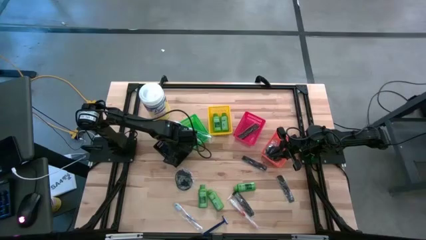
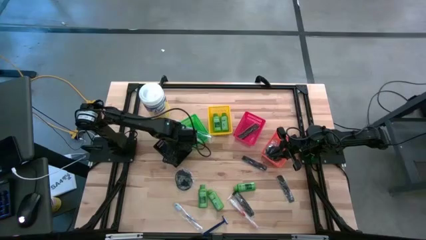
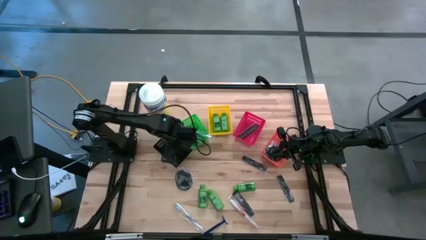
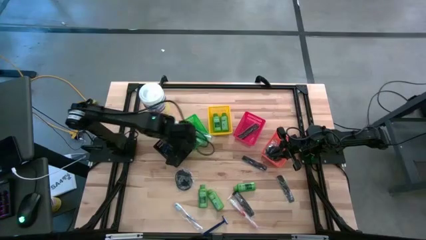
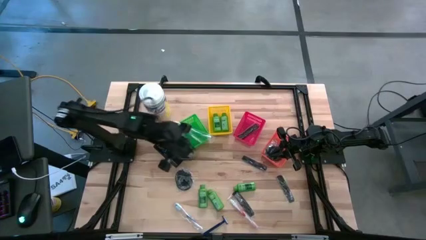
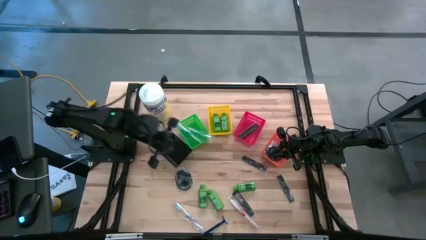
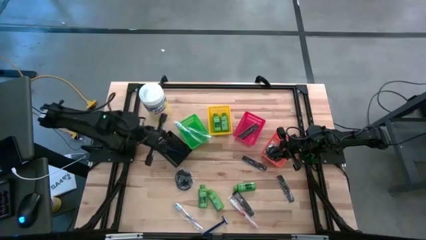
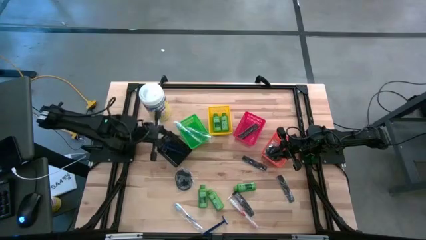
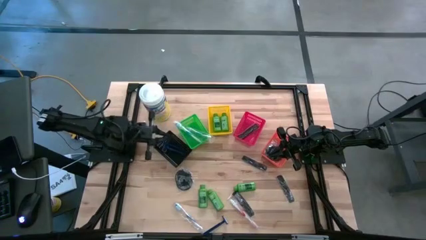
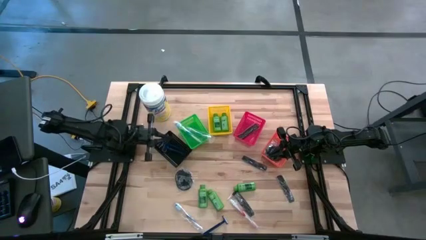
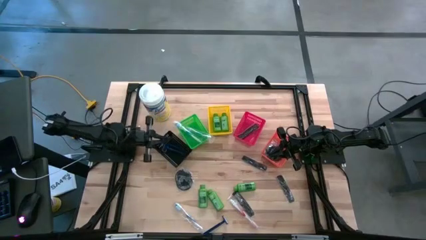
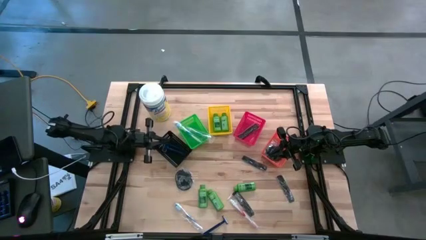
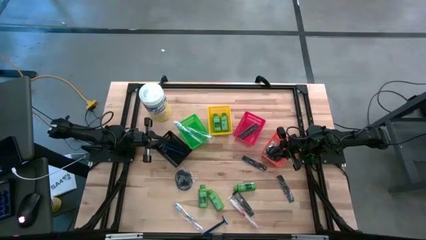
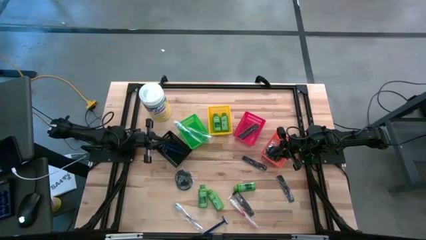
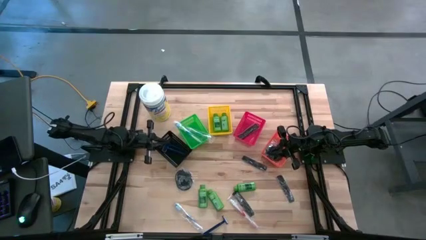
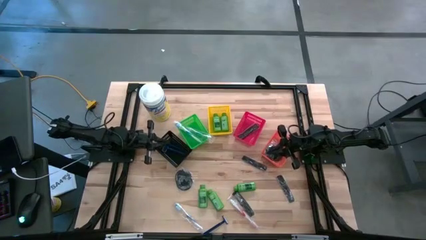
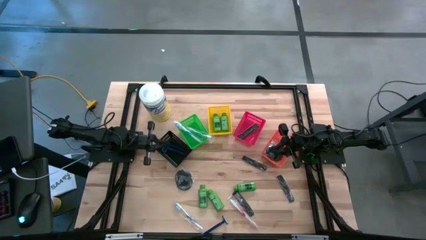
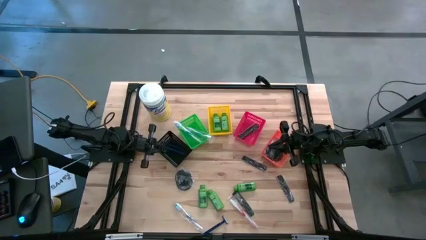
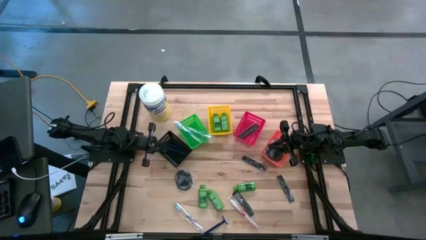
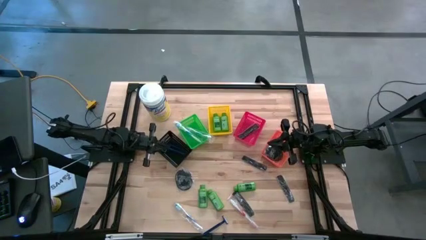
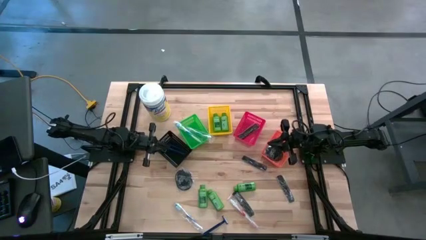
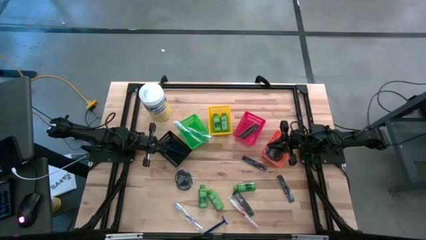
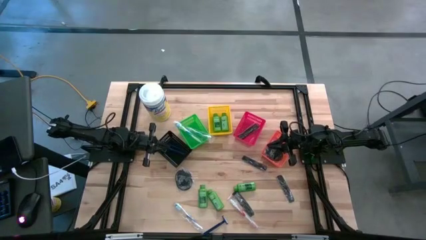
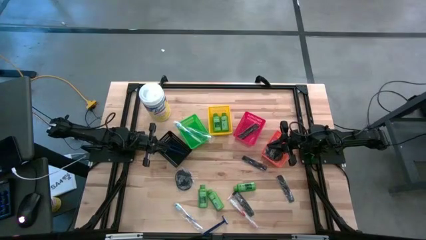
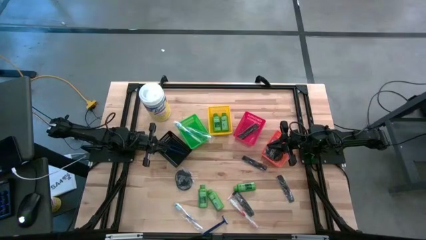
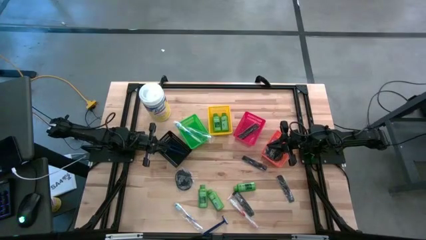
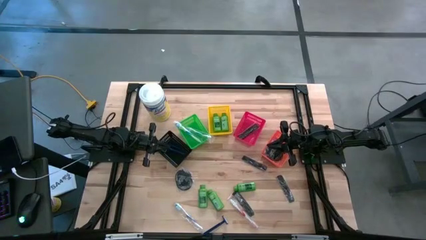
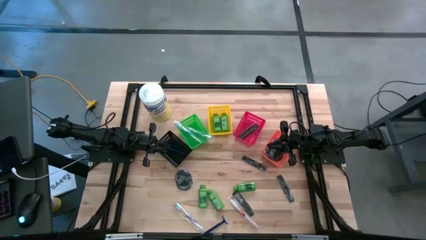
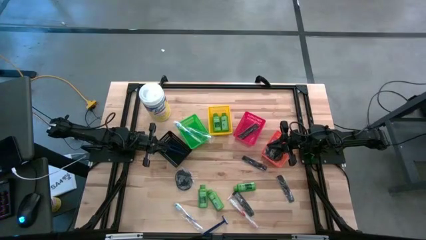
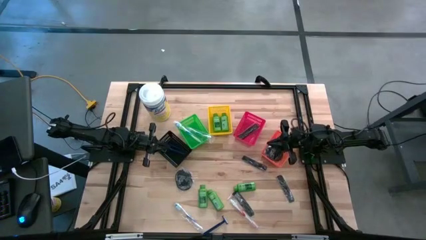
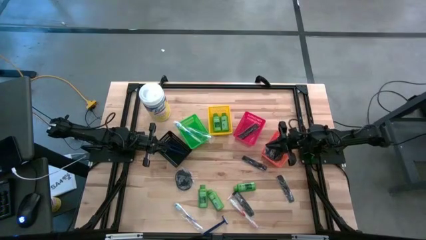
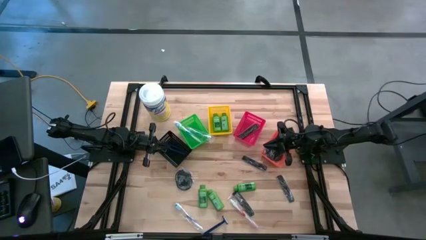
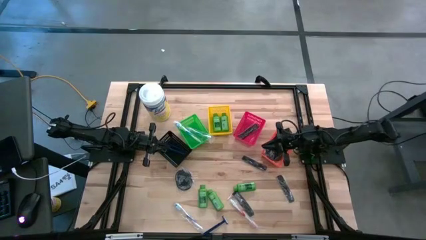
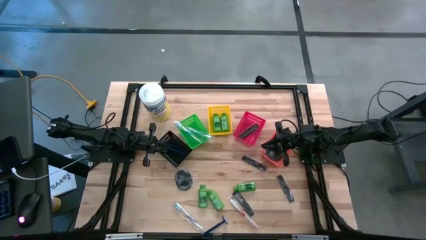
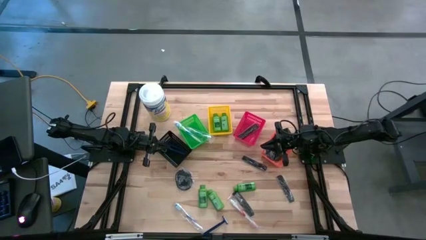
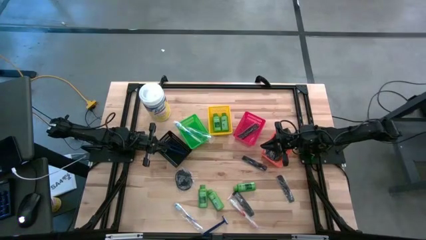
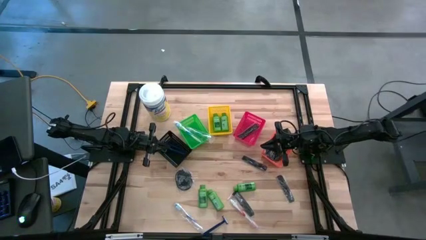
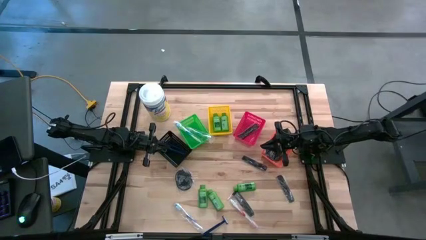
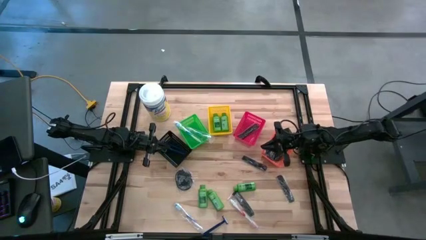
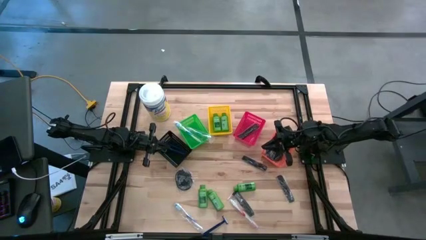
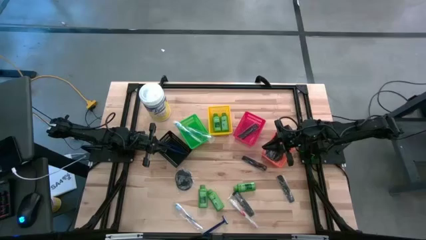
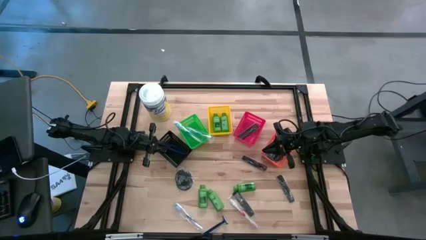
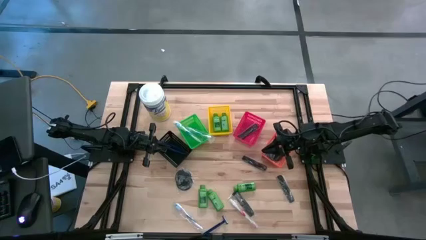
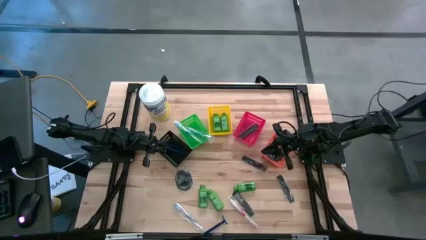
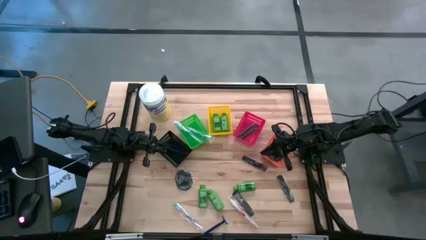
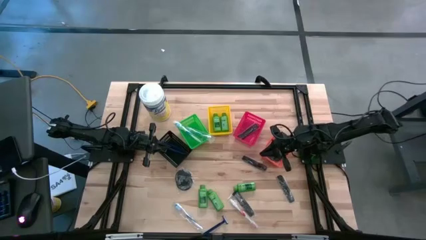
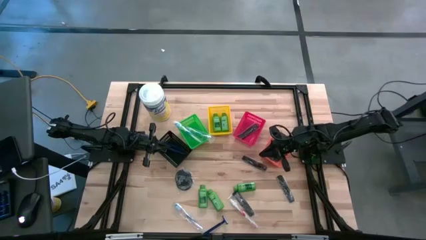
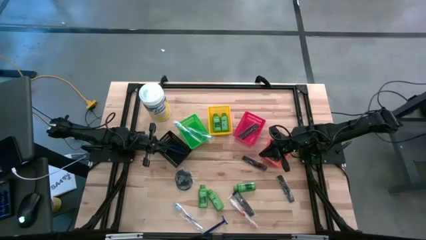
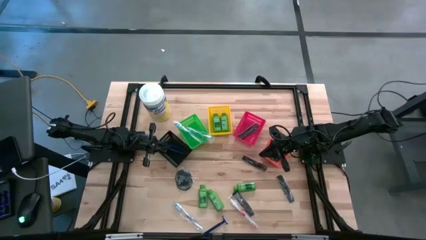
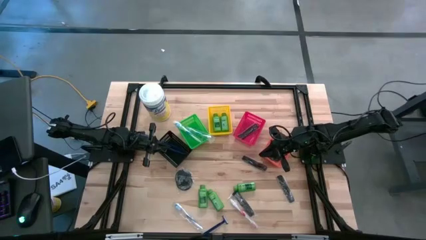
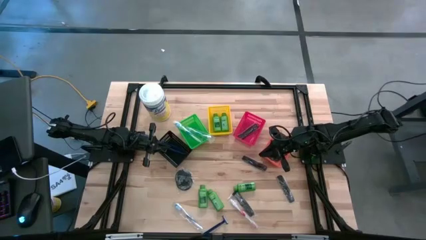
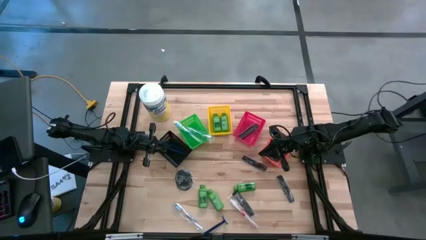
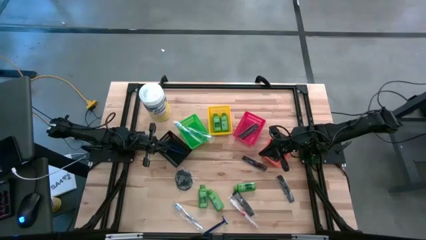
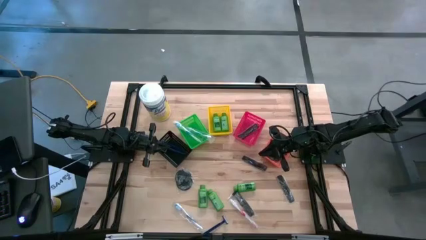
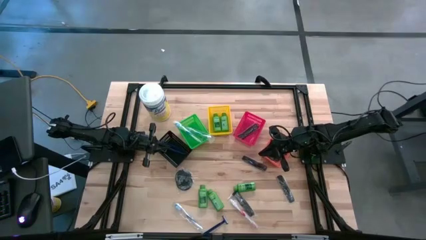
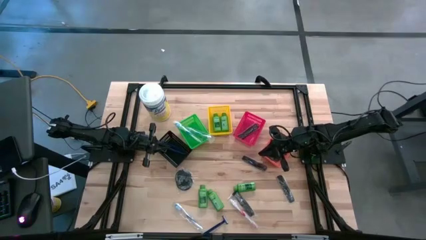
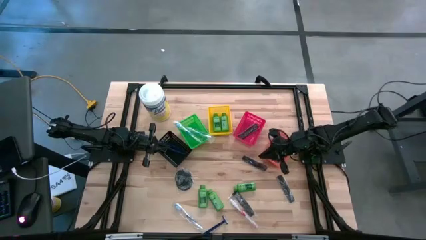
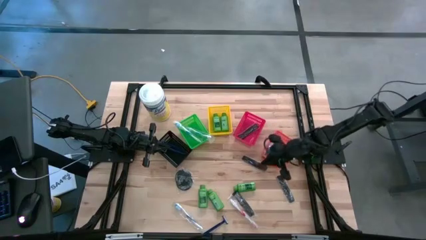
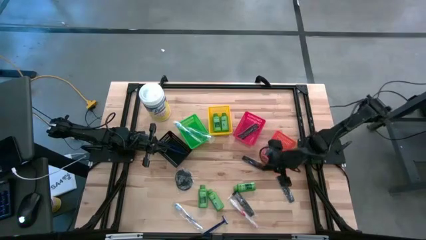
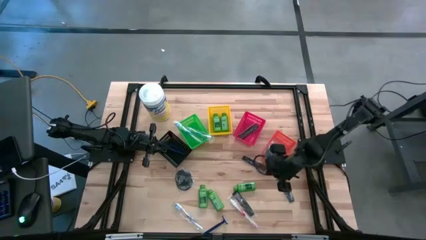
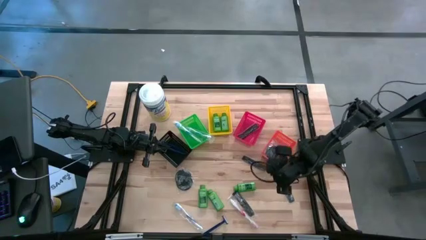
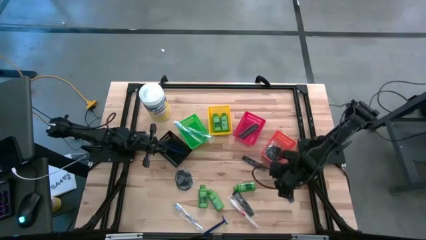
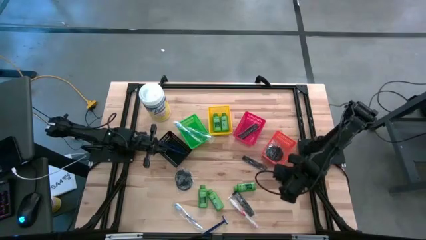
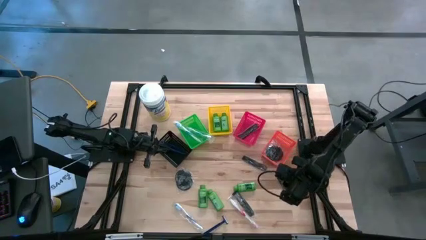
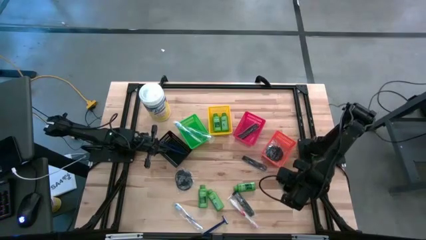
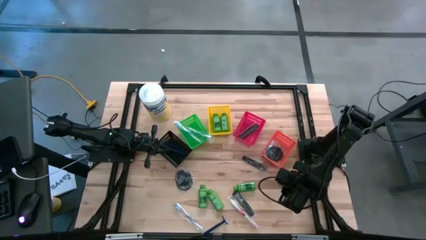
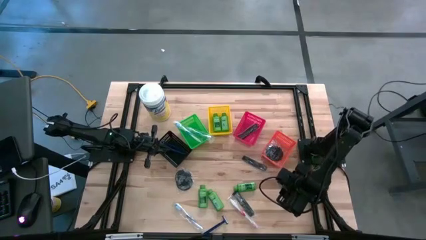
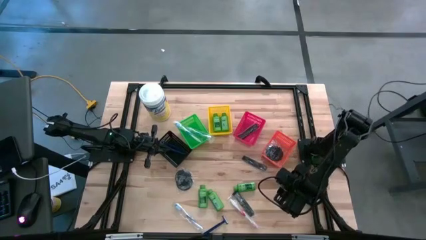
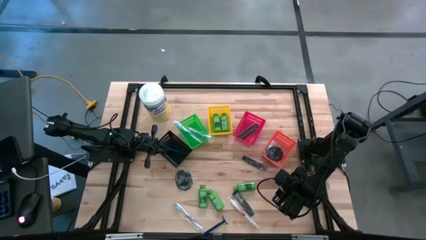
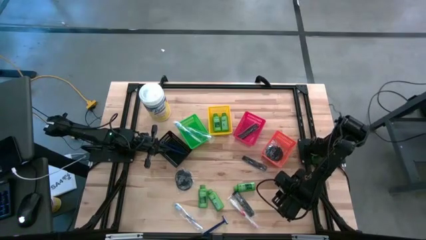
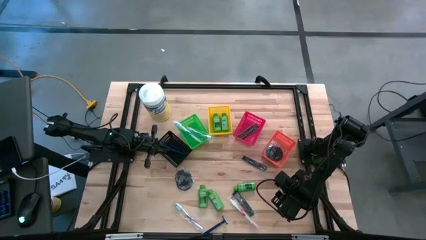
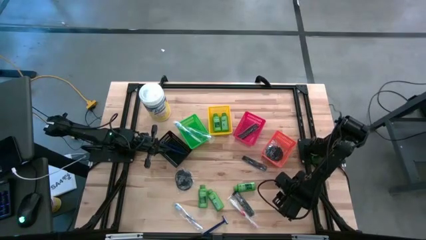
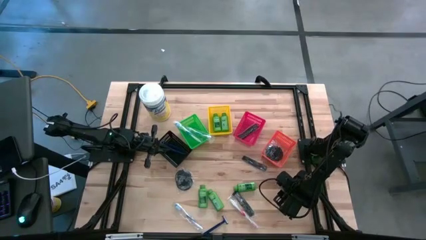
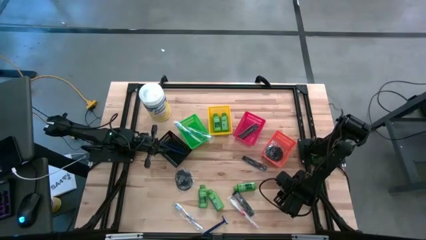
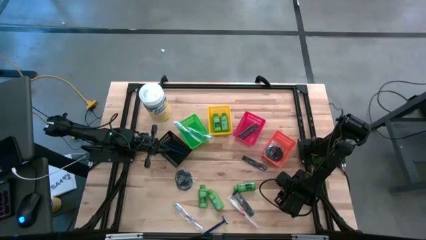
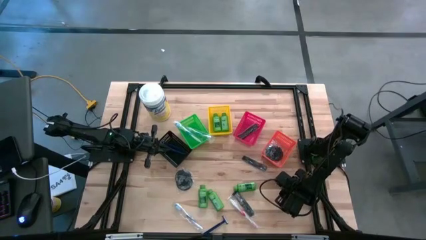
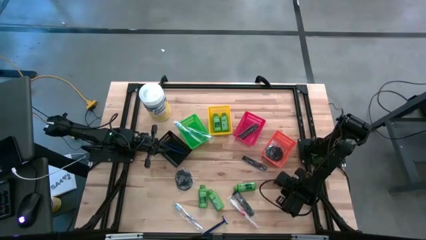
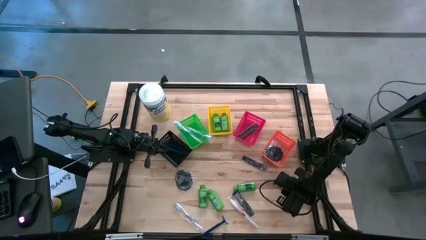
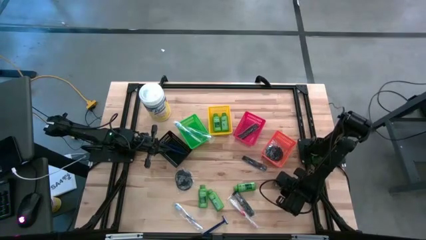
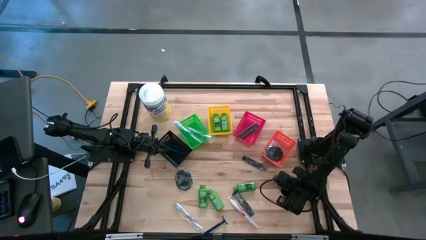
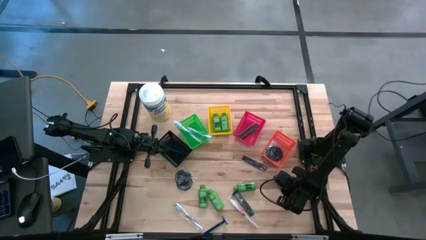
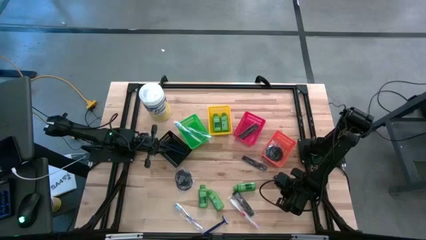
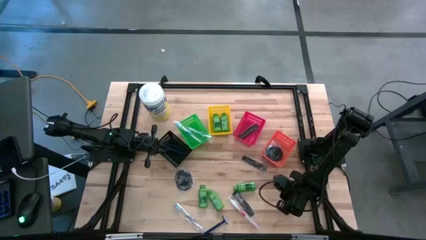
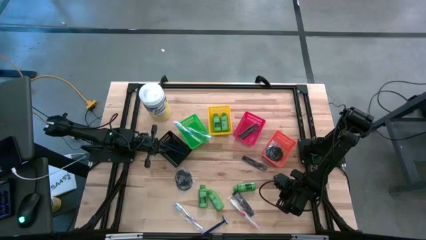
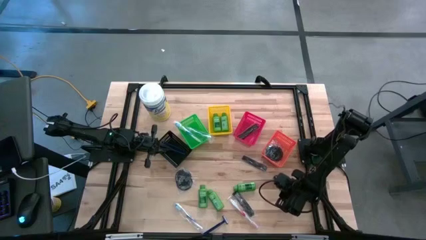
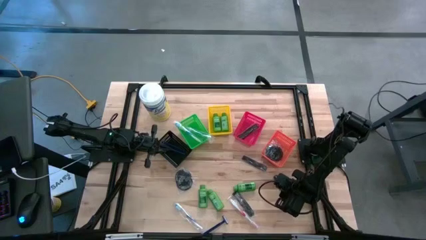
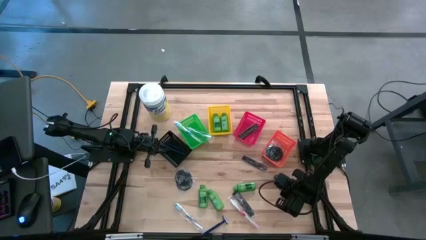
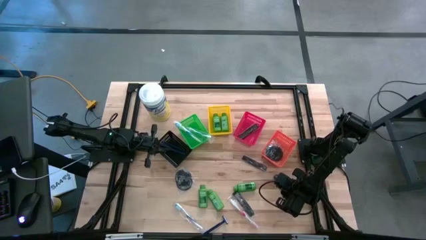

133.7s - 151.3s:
Task: Pick & Place Travel size toiletries
Put the black hair comb into the red bin
